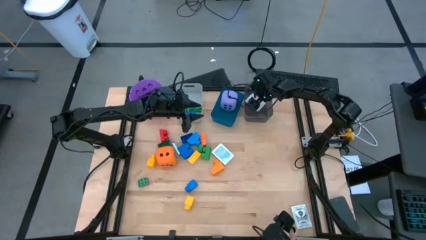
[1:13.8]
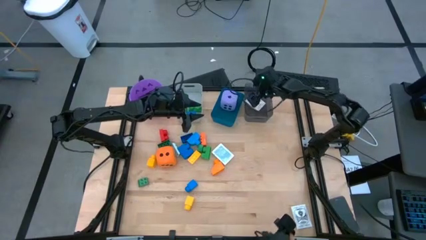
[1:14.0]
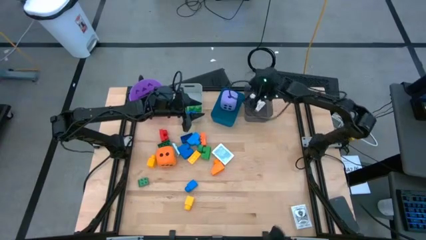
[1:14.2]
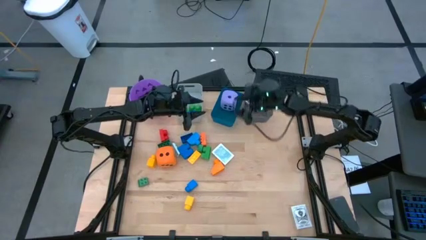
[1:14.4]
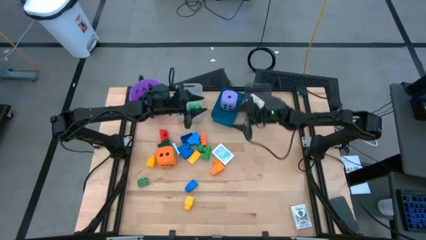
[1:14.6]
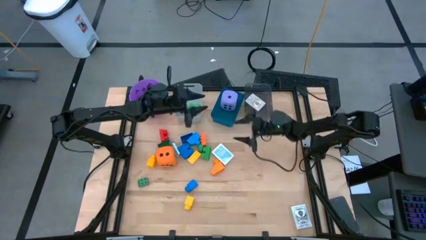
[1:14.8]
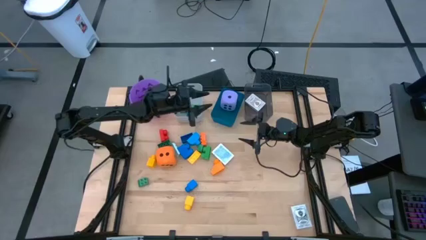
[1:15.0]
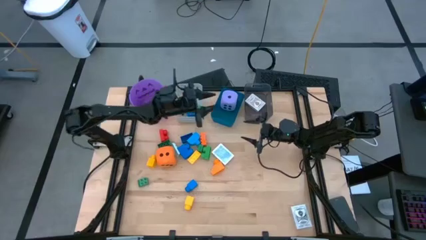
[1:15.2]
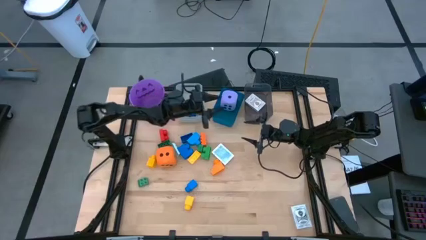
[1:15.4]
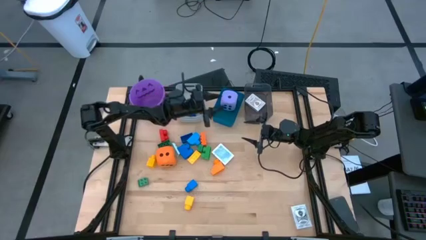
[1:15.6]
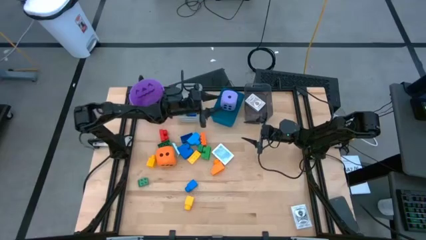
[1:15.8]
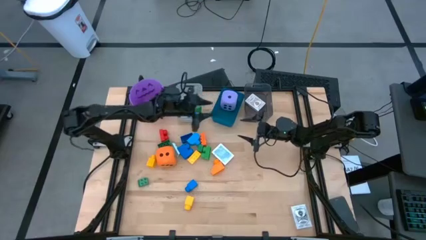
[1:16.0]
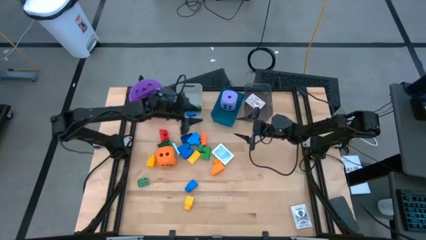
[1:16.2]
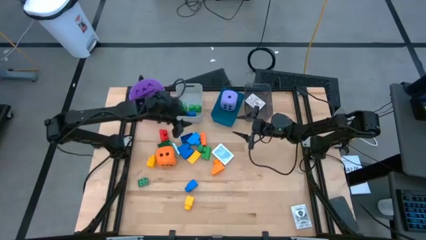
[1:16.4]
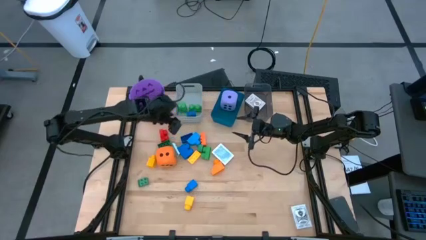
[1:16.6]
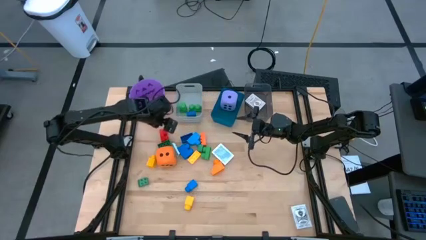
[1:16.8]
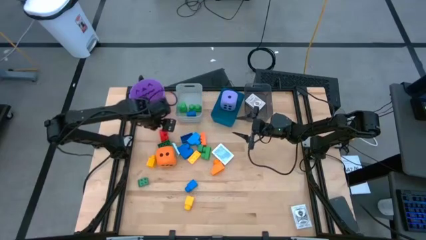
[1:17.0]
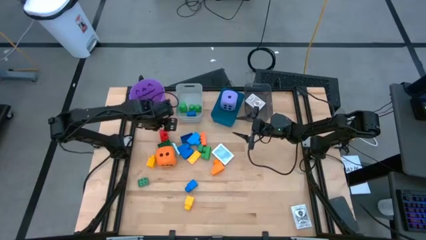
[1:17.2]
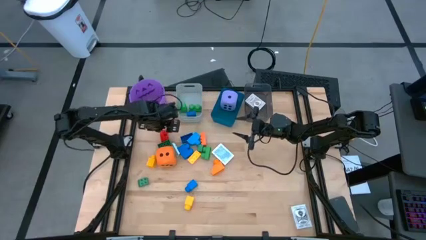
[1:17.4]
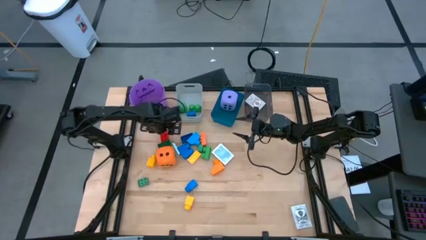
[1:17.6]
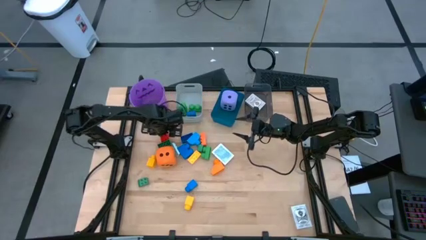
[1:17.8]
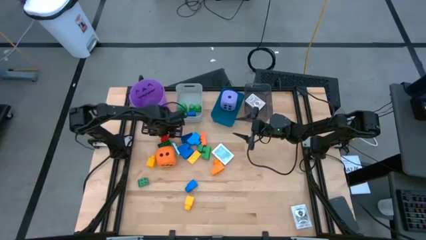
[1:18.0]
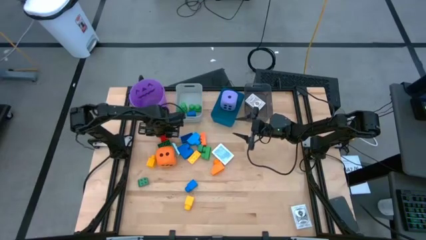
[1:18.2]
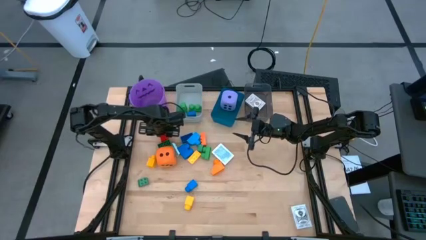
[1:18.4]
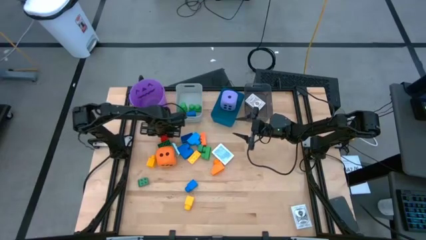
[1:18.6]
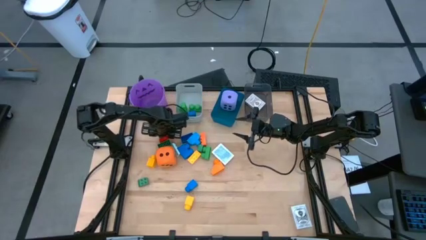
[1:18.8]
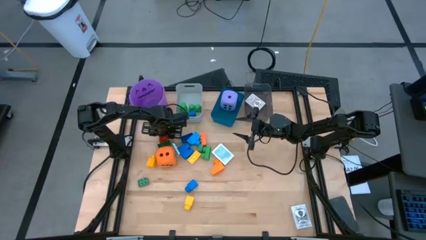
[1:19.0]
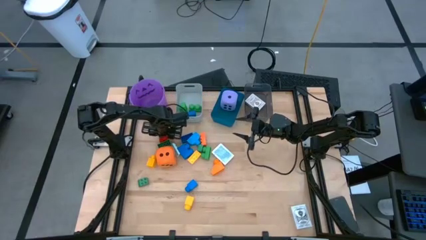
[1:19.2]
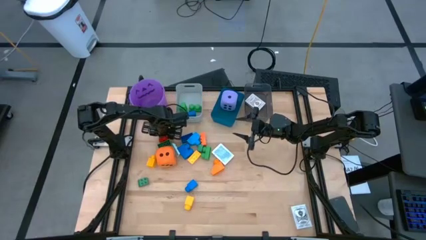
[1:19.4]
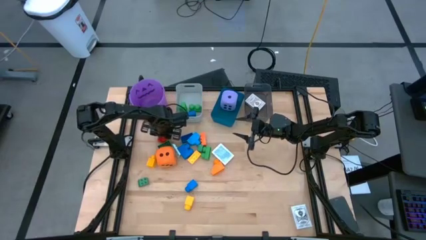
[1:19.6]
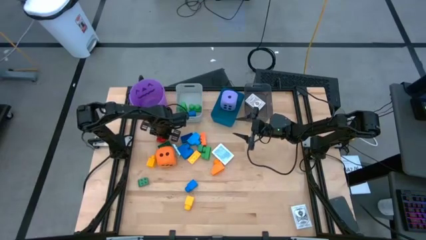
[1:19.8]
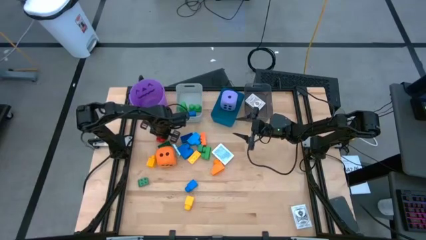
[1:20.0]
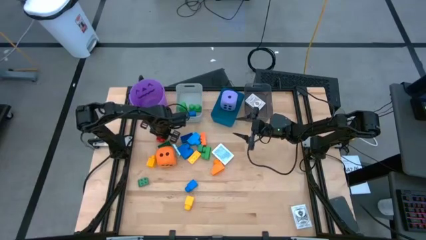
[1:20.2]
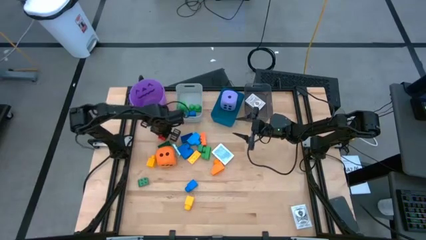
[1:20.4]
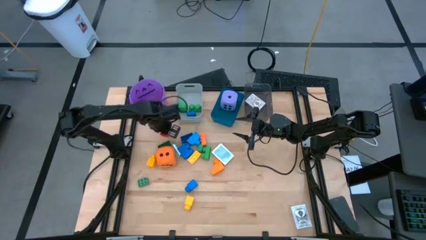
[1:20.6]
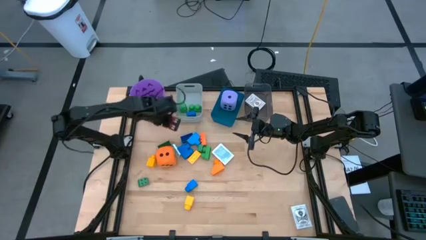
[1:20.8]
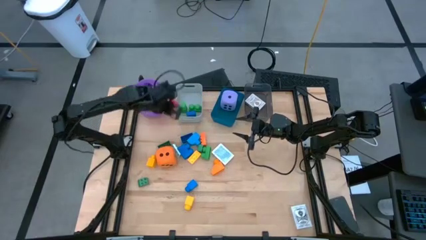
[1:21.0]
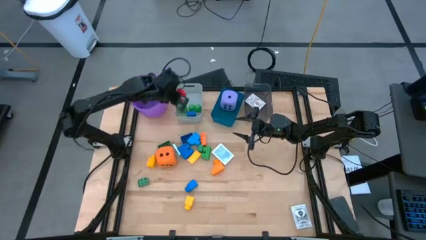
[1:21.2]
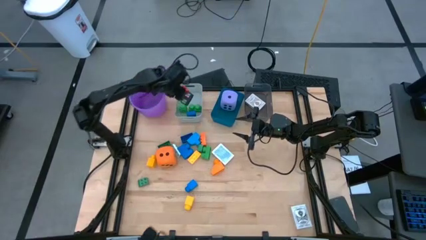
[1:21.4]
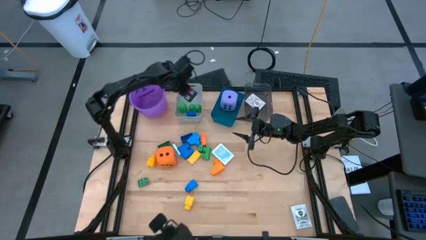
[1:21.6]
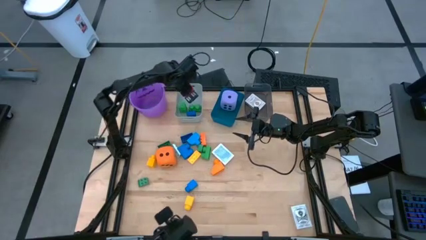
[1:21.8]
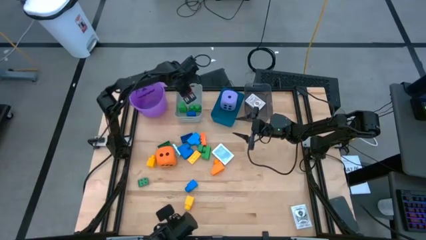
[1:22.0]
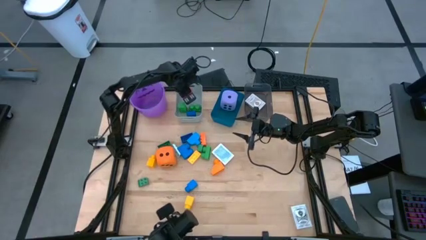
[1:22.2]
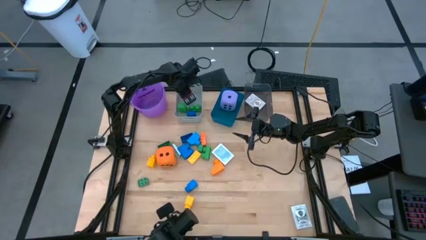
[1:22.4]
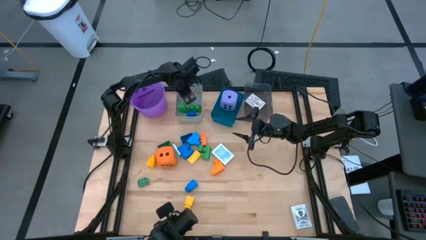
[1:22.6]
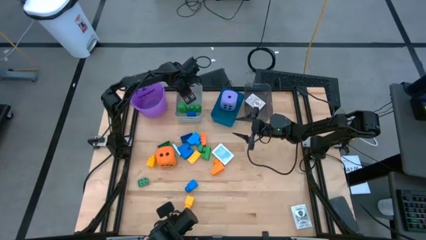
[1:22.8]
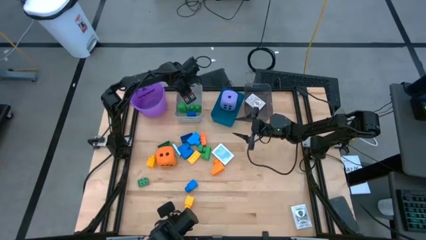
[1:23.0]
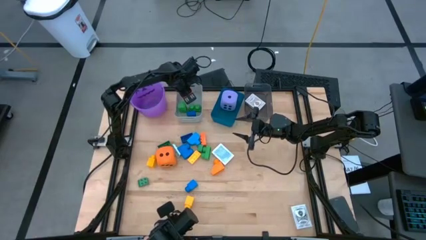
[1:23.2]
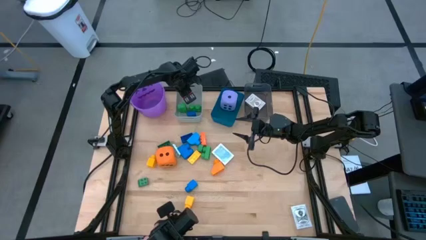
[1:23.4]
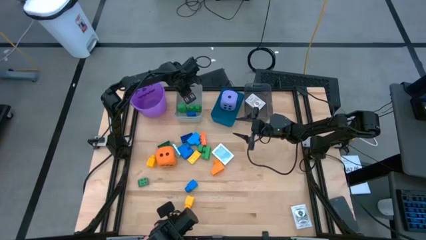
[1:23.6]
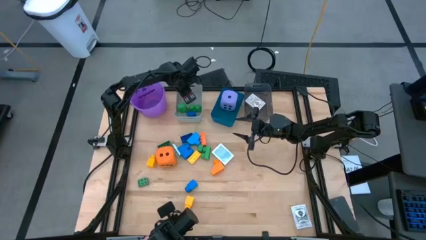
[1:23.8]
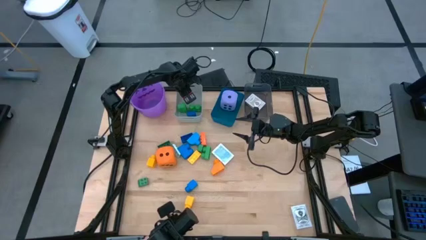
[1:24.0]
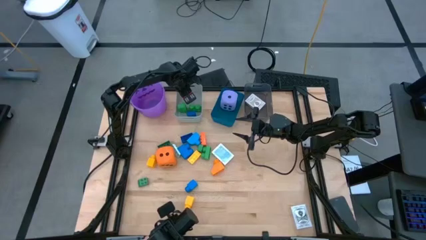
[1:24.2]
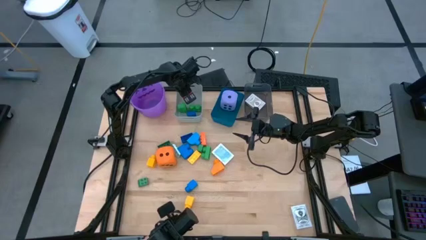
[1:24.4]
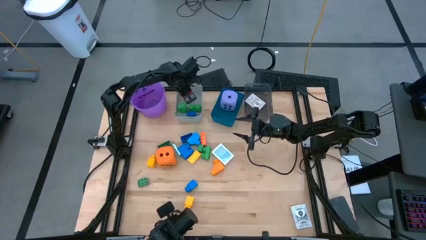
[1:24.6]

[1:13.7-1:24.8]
Task: Pick & Place Toys
Put the red game piece into the gray bin

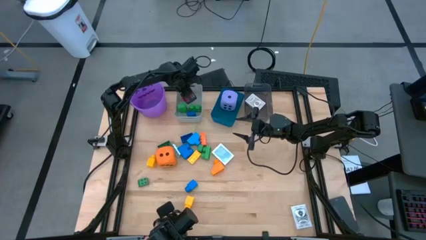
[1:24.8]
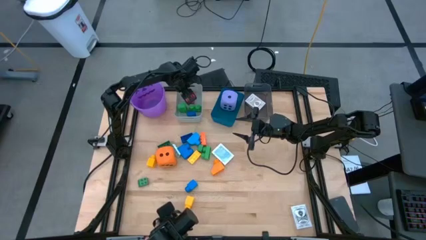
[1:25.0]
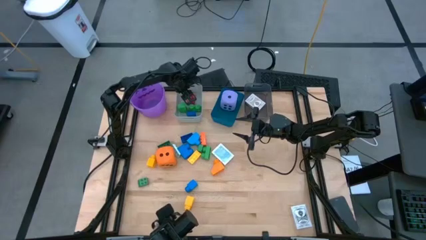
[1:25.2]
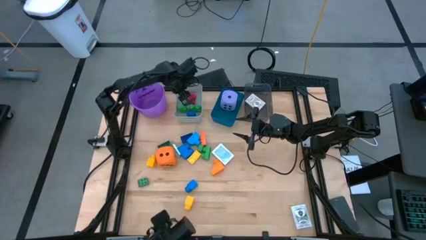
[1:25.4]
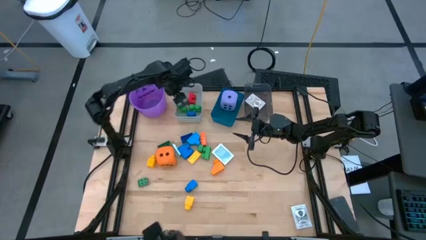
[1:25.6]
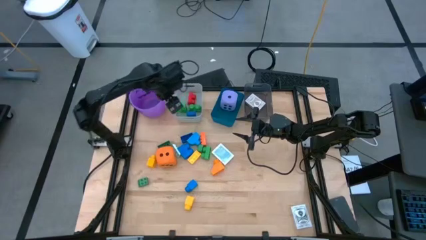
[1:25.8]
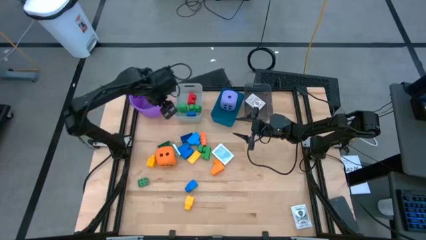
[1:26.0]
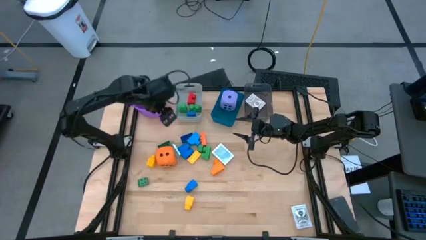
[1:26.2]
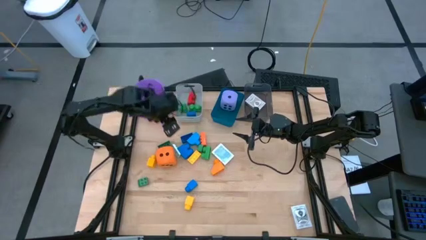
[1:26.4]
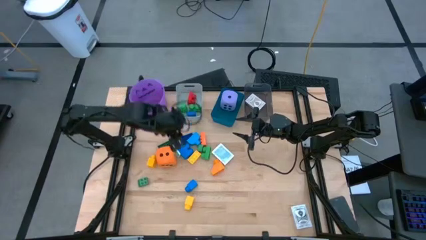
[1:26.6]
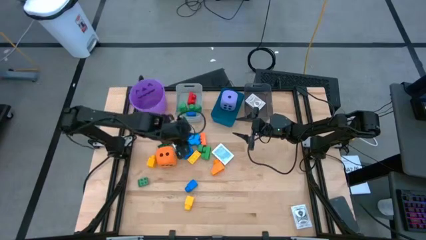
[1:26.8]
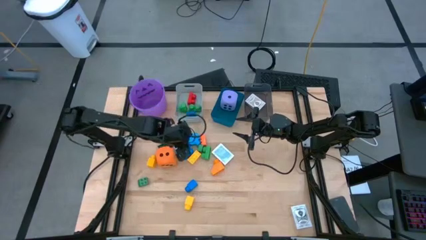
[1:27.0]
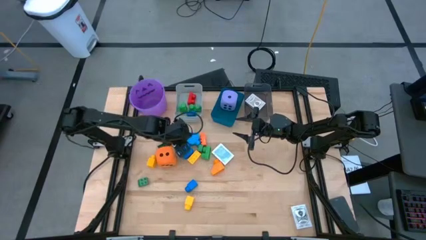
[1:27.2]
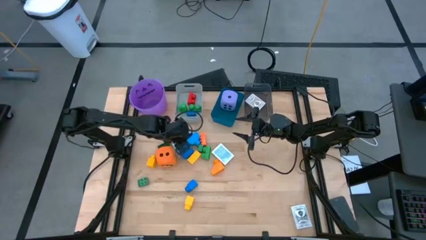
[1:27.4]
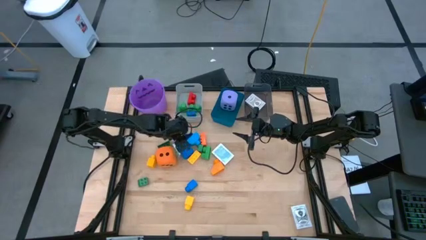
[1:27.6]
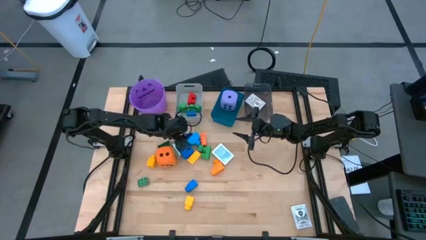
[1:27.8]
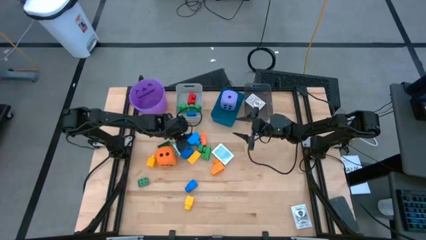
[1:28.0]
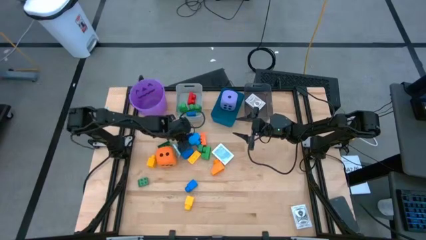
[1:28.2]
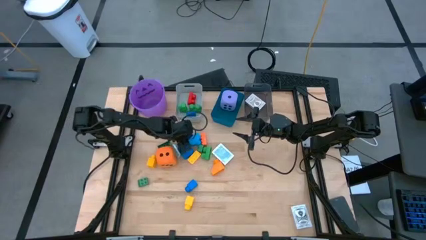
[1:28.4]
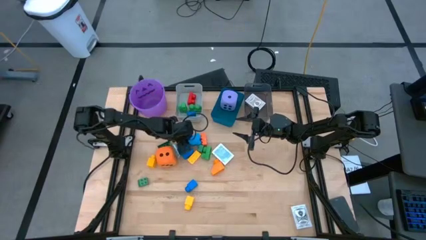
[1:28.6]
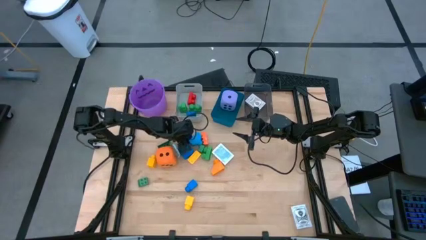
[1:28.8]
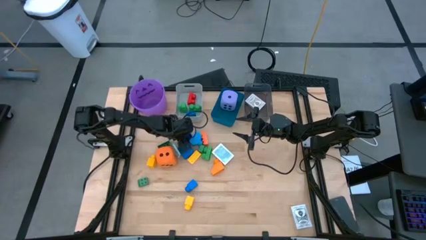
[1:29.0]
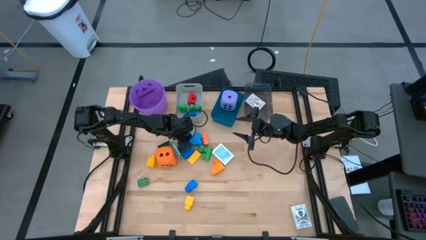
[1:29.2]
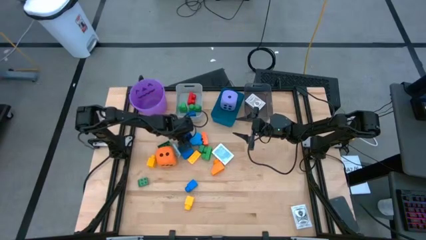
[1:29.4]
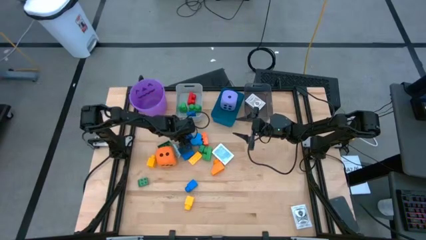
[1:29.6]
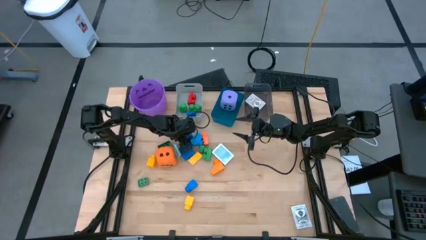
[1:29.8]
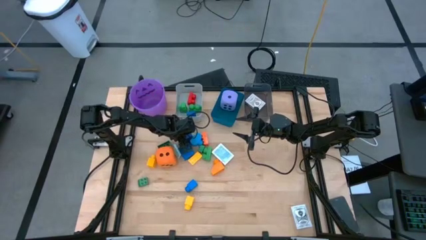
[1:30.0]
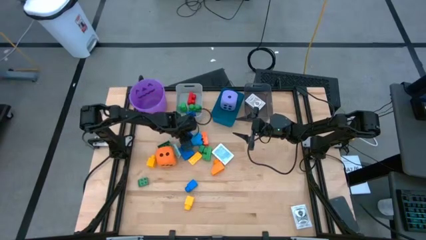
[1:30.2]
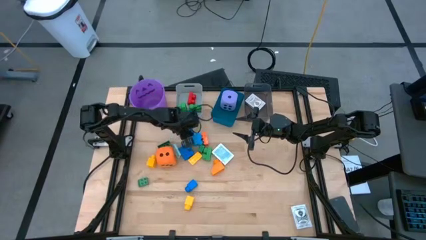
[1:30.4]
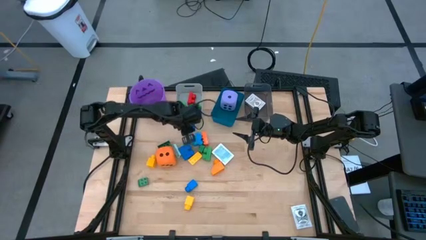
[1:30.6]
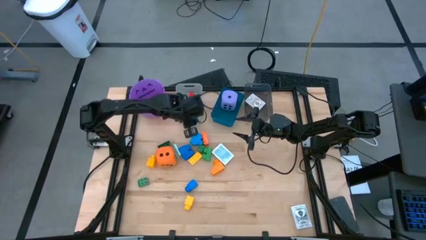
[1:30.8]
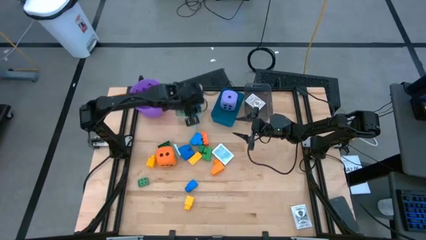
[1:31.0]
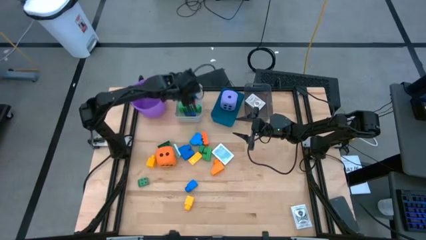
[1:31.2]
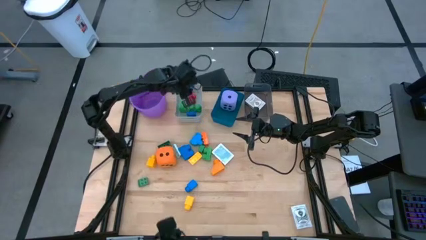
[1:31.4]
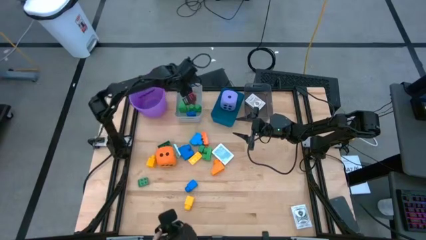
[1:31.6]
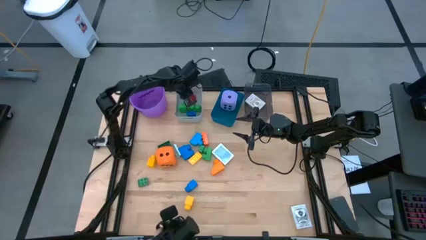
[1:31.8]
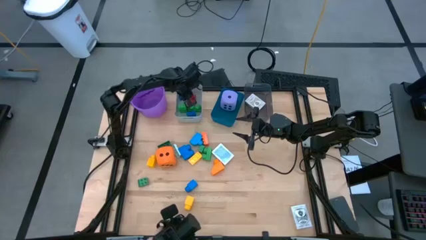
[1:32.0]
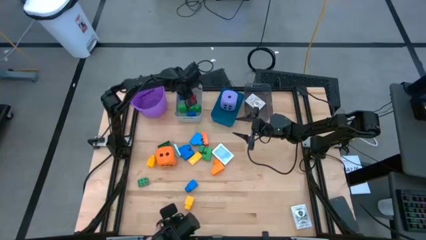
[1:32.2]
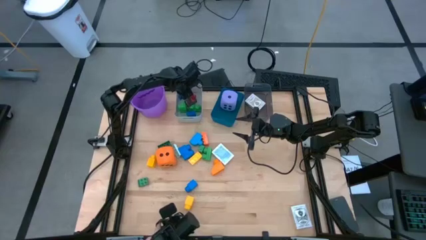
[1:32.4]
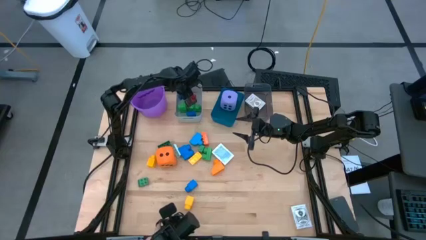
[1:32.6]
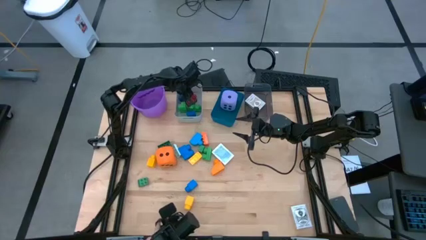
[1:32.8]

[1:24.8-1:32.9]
Put the dark blue game piece into the gray bin
